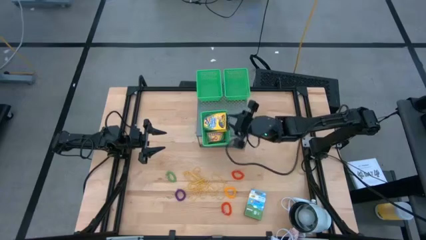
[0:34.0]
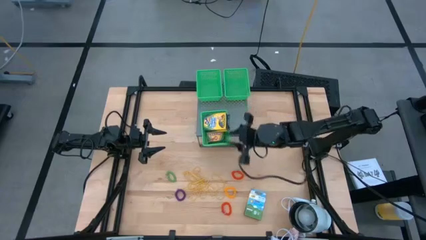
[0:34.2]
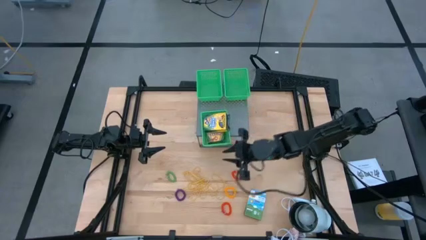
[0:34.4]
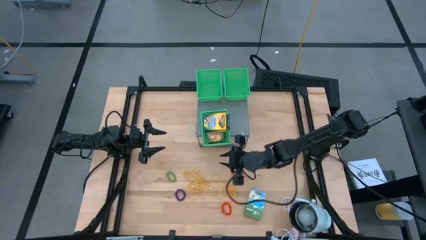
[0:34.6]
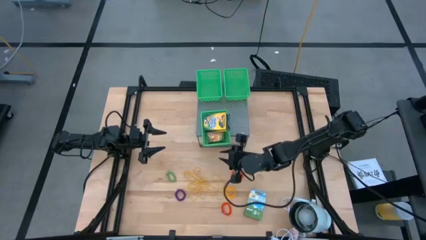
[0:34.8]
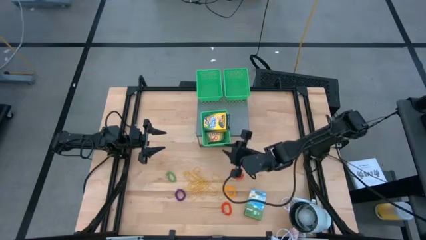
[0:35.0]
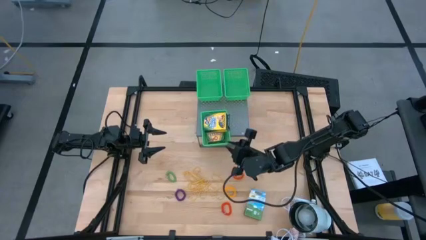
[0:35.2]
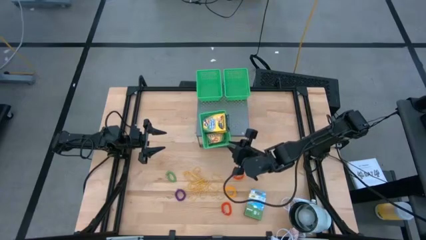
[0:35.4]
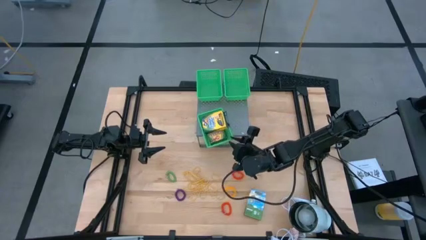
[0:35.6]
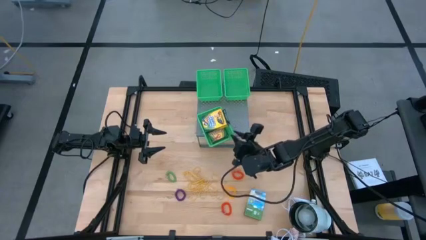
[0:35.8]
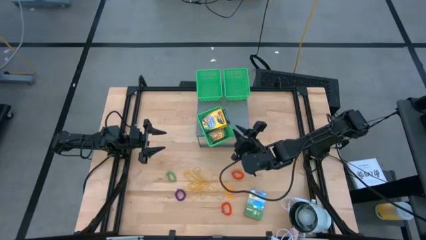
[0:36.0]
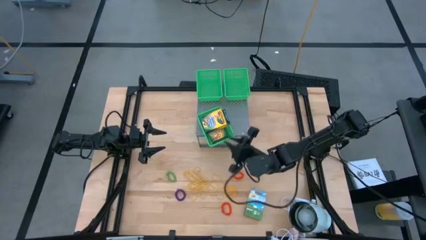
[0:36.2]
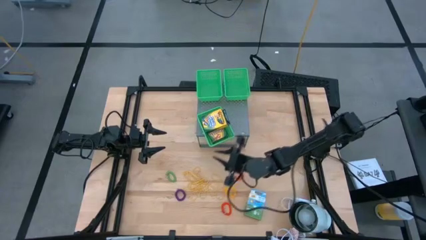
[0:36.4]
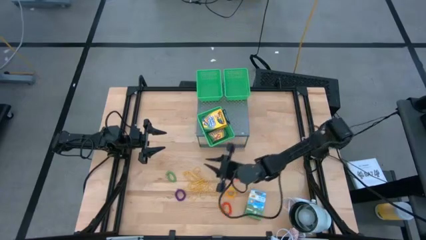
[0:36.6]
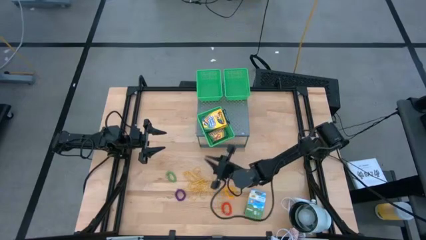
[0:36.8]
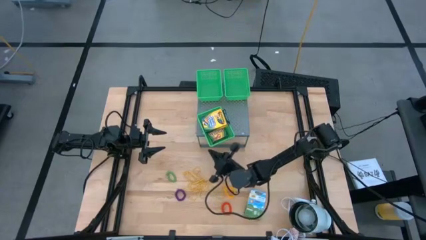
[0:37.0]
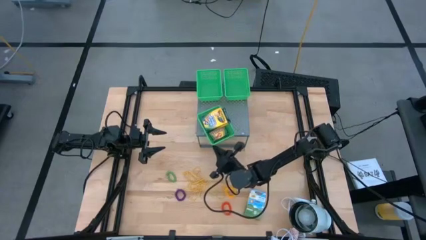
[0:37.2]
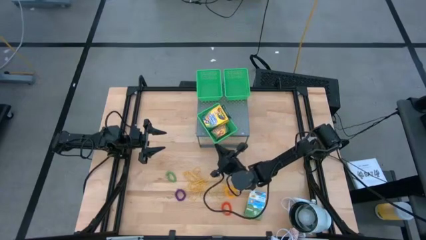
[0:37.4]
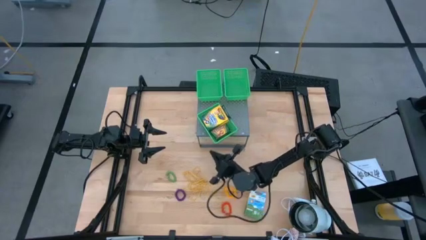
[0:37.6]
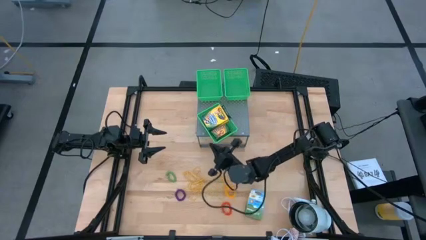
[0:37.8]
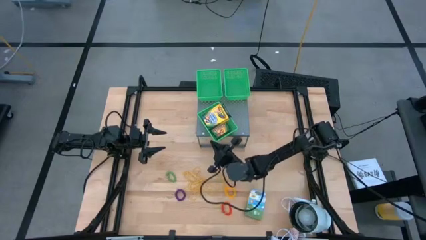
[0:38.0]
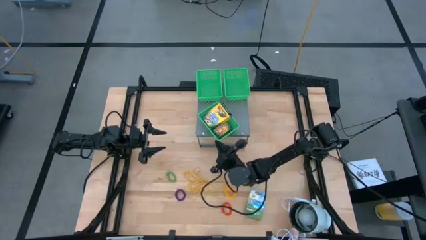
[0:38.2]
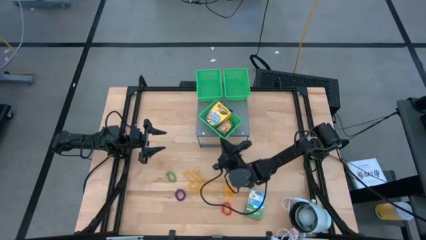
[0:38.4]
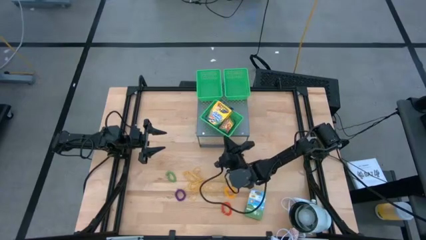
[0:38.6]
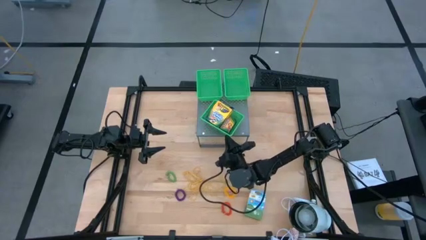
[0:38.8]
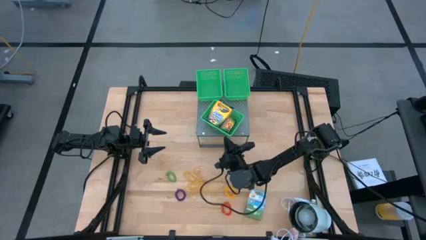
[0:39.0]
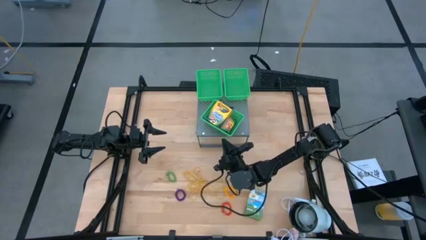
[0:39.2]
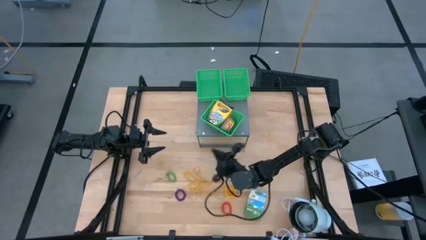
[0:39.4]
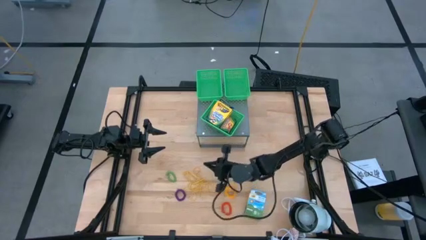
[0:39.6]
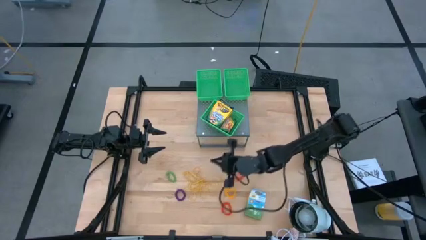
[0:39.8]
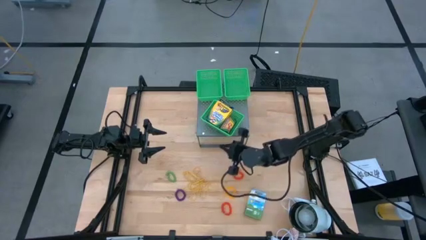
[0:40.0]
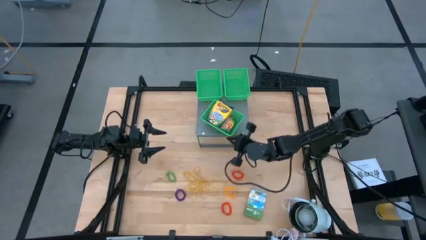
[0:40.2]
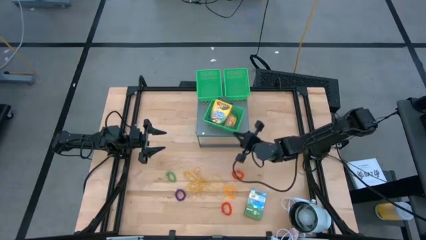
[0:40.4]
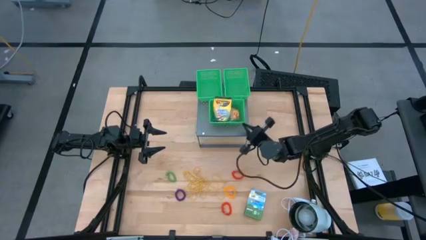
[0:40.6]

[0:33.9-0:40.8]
Task: Pick & Place Office Desk Supplies
Adjust the bottom green bin on the shelf

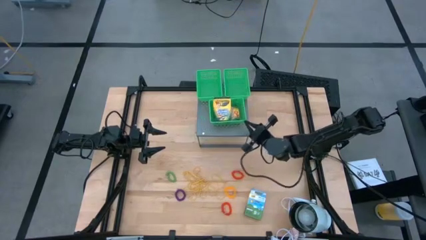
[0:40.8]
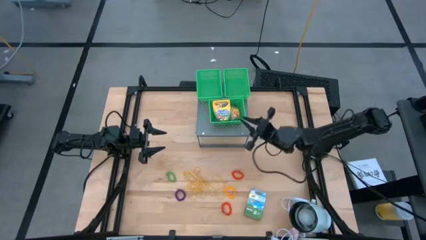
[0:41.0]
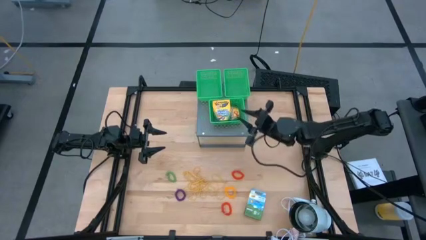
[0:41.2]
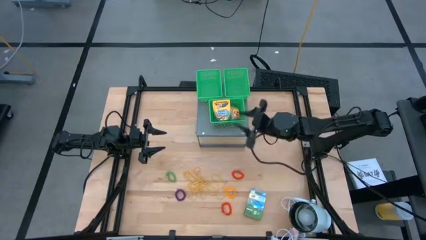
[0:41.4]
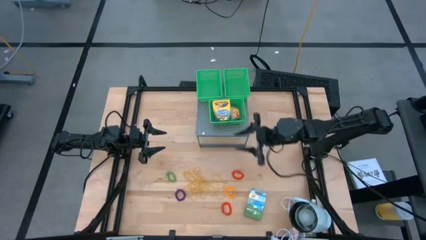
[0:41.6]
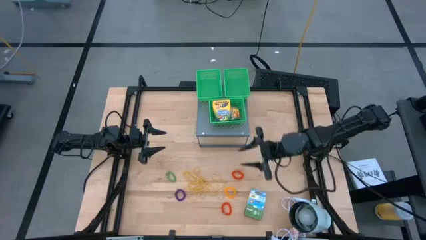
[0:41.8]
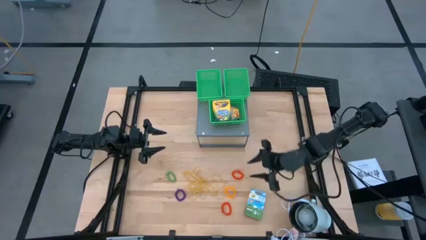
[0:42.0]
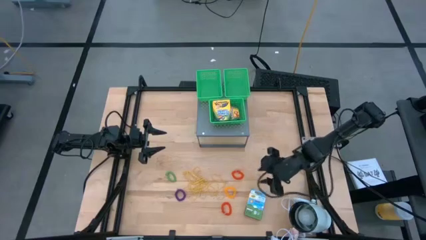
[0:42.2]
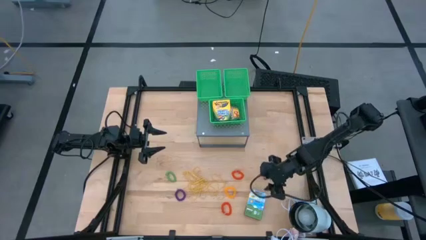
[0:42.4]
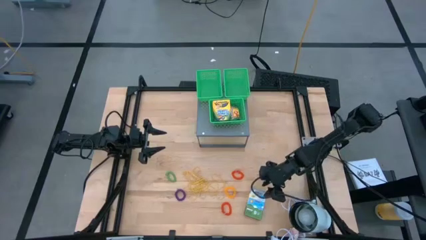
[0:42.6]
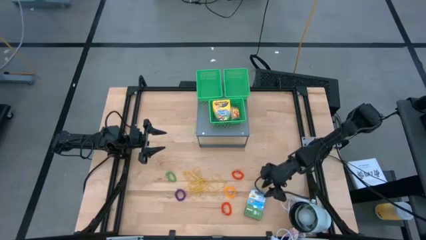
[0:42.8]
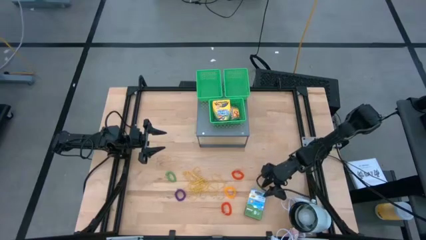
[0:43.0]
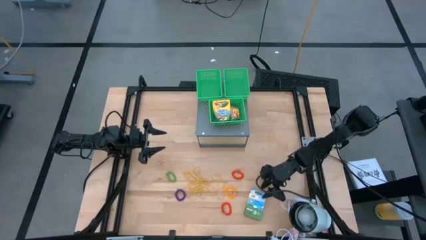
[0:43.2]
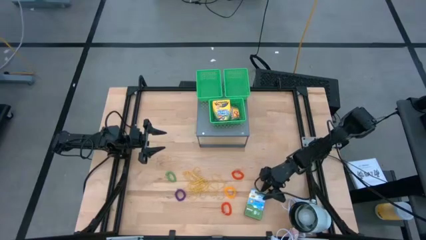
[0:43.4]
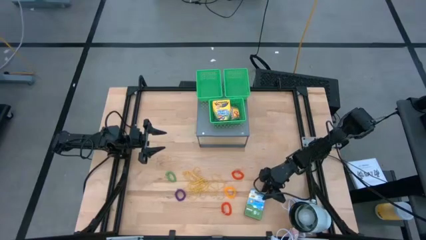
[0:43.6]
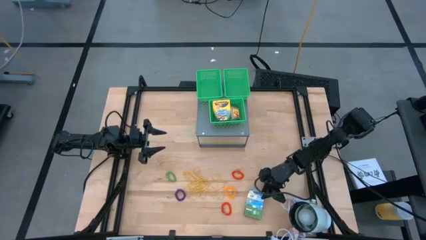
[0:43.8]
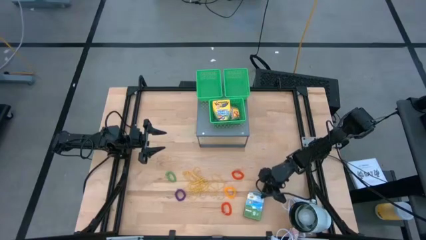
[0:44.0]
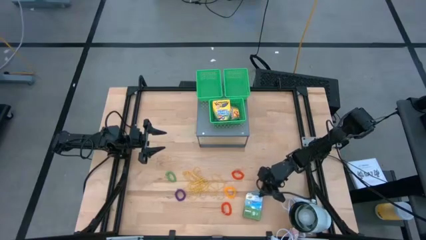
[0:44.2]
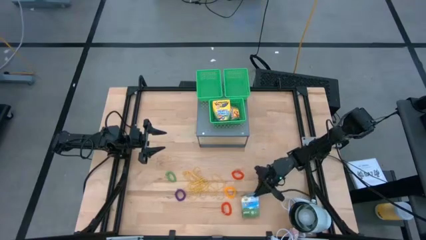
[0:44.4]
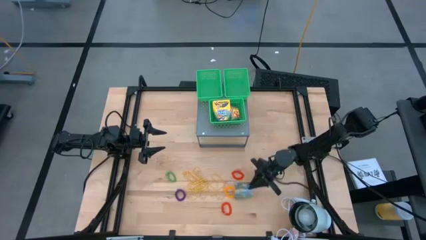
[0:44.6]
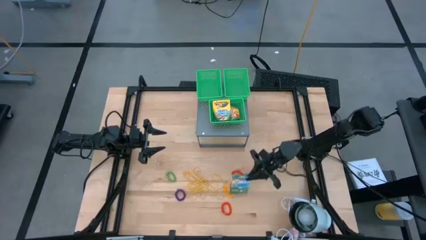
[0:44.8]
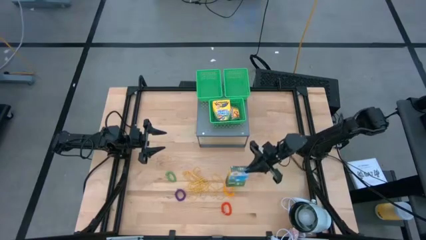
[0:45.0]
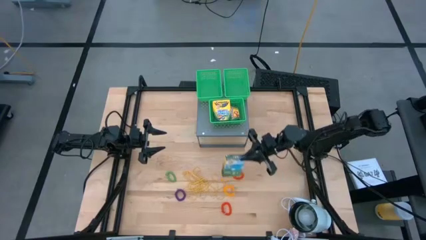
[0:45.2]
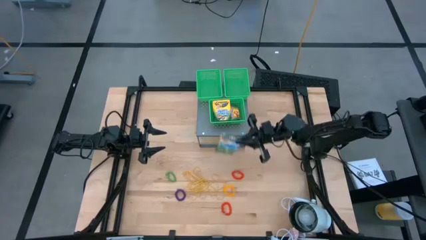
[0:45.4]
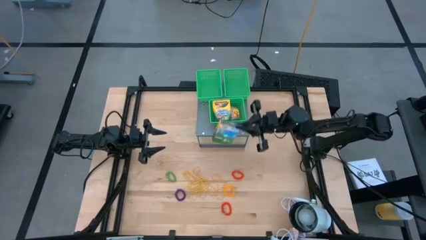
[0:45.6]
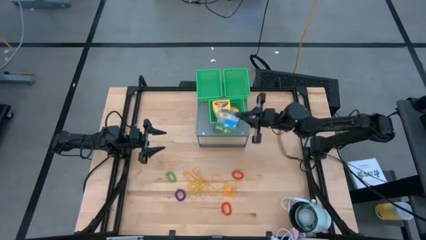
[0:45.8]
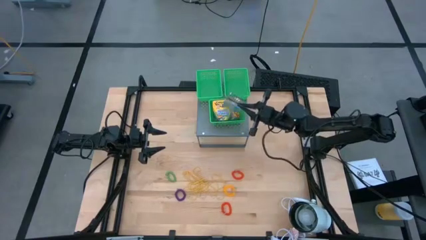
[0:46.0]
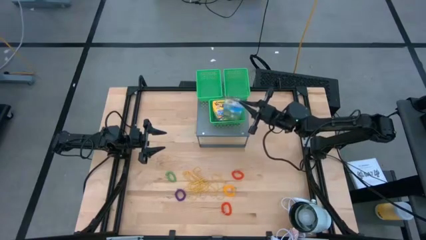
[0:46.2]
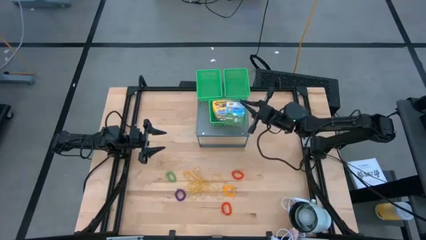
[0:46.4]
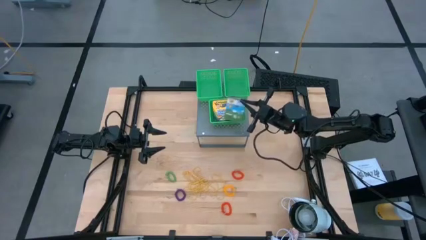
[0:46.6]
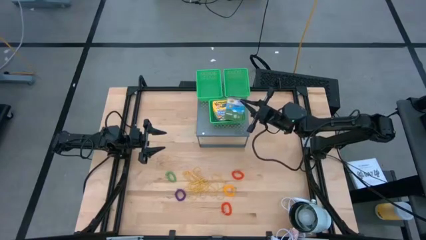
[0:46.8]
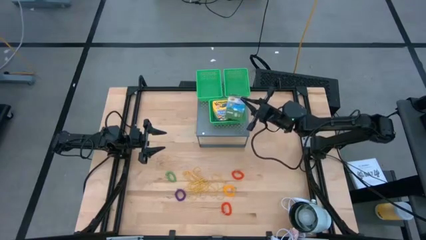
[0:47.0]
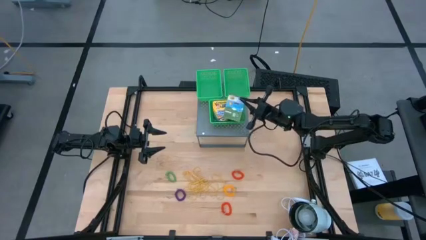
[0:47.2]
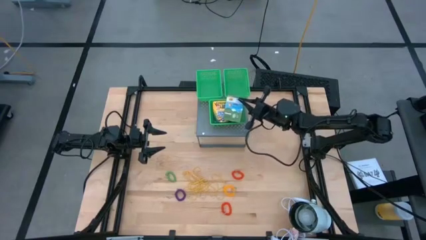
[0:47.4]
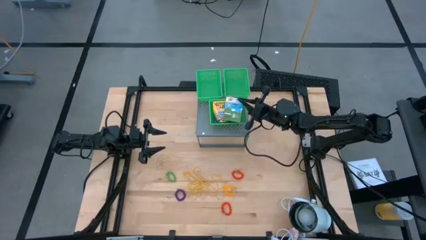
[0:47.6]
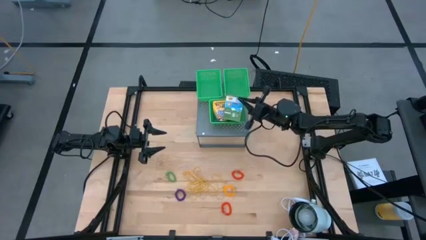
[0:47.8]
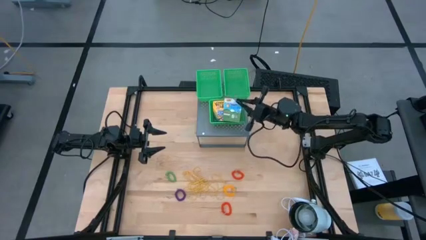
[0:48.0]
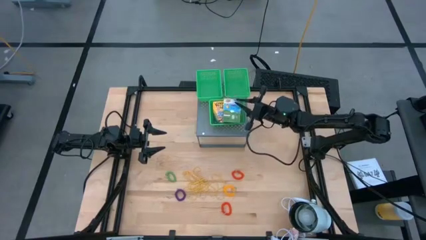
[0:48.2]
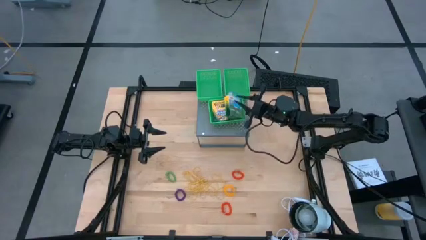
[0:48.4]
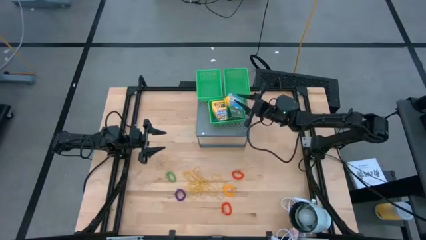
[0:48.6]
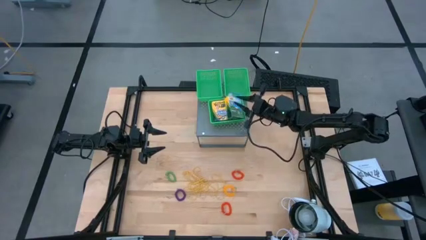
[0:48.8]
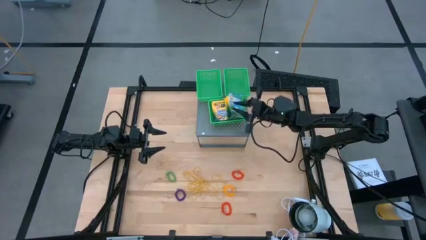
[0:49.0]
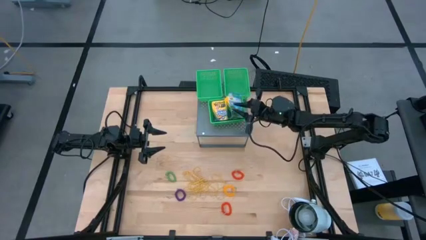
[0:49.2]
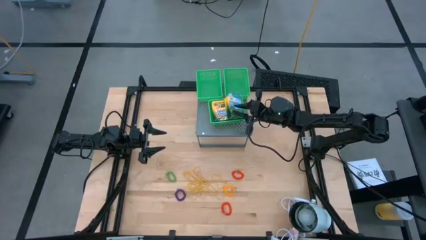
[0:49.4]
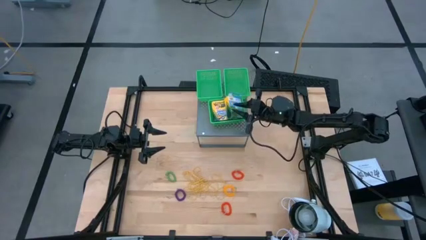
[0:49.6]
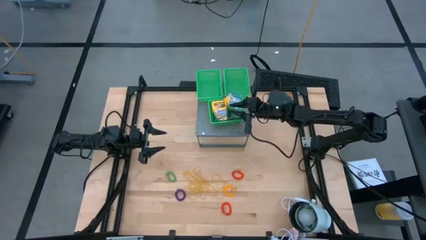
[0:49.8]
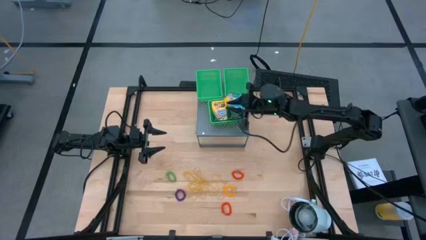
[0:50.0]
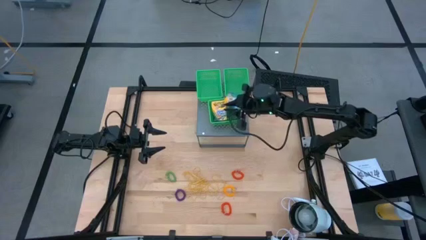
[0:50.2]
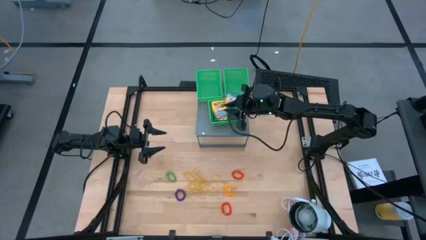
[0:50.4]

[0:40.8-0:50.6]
Put the crayon box into the bottom green bin on the shelf
